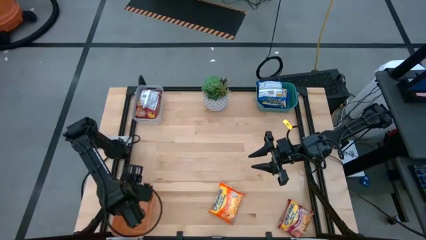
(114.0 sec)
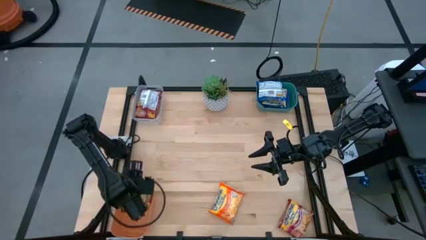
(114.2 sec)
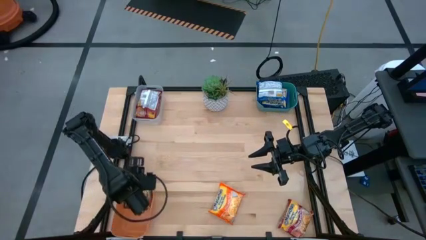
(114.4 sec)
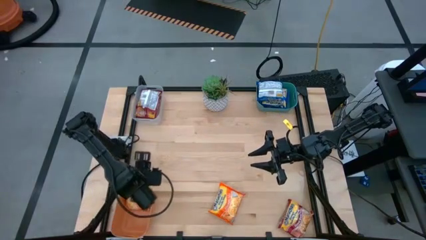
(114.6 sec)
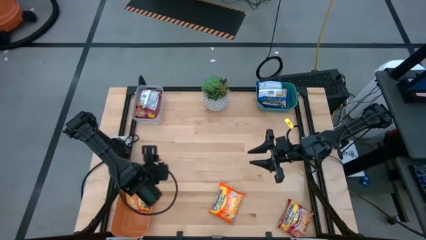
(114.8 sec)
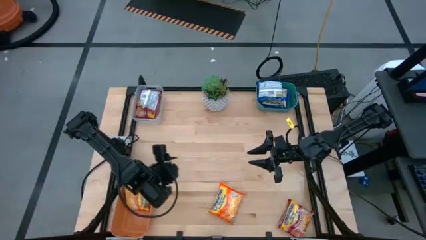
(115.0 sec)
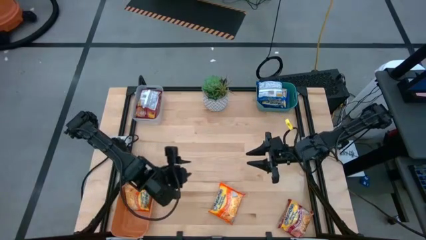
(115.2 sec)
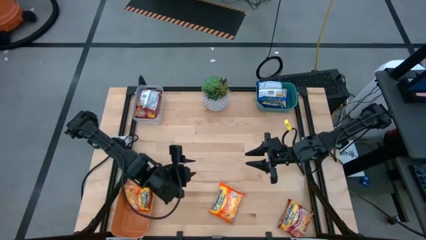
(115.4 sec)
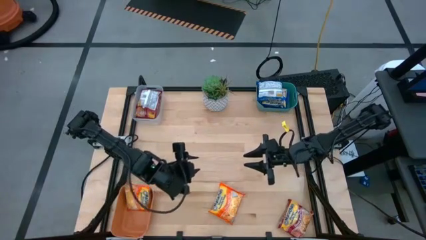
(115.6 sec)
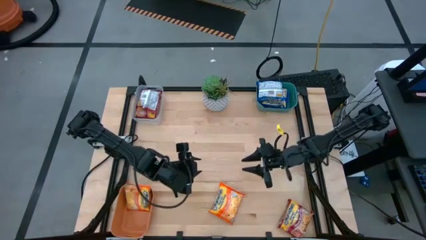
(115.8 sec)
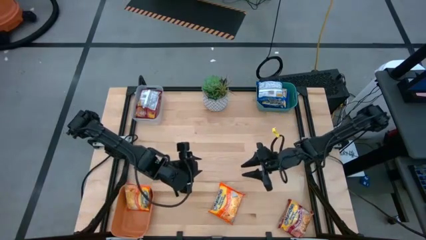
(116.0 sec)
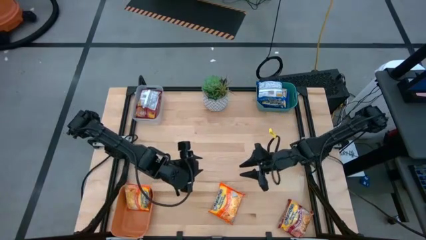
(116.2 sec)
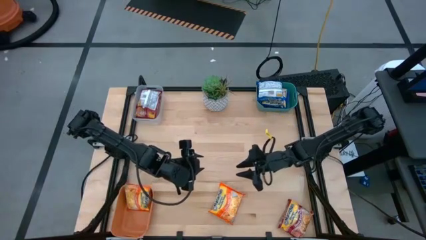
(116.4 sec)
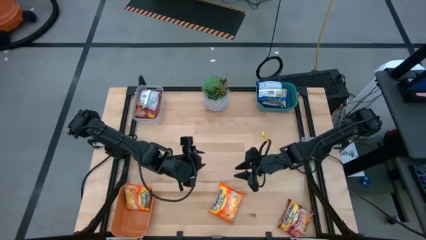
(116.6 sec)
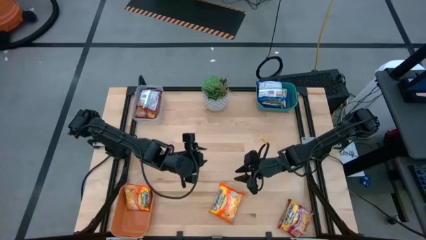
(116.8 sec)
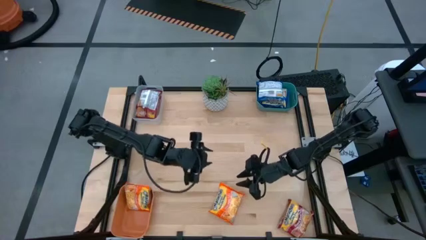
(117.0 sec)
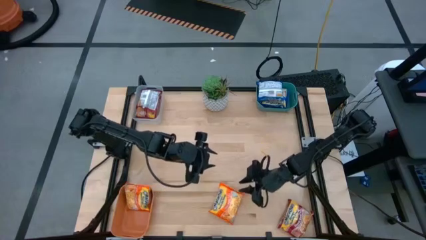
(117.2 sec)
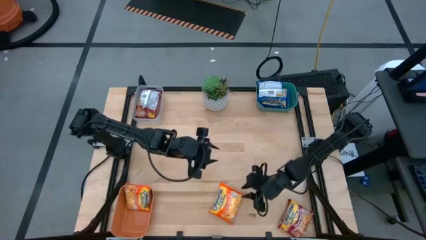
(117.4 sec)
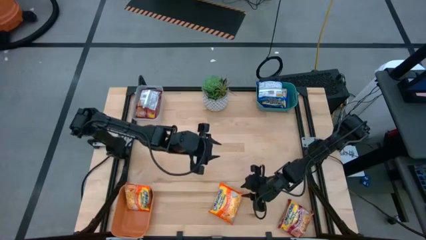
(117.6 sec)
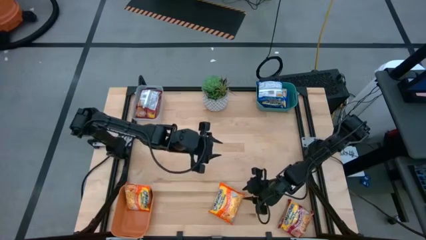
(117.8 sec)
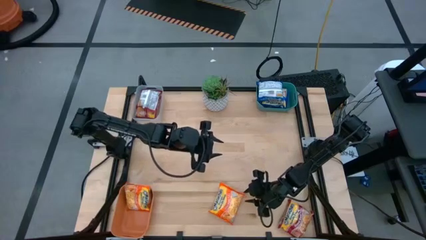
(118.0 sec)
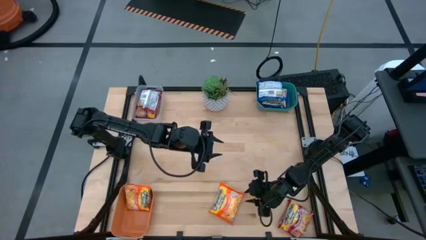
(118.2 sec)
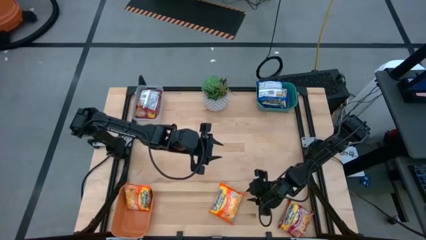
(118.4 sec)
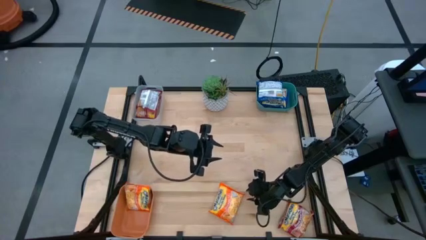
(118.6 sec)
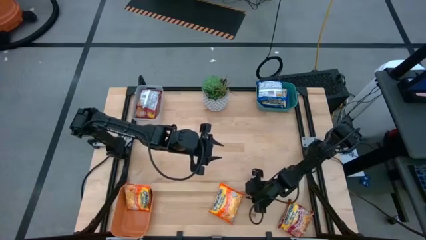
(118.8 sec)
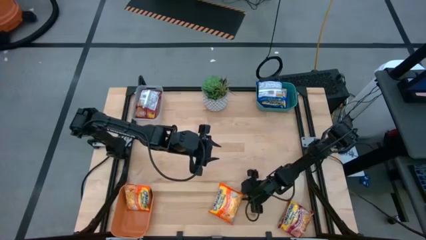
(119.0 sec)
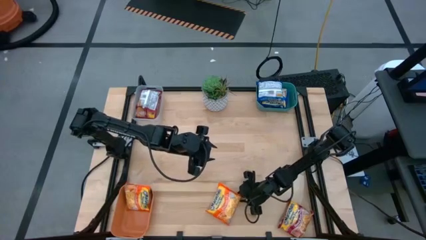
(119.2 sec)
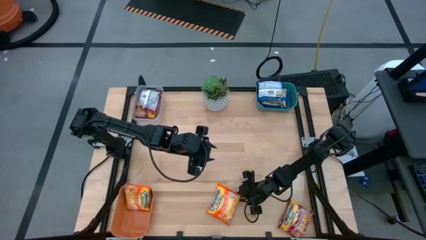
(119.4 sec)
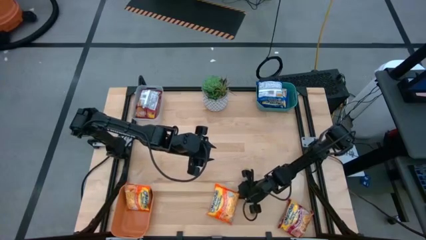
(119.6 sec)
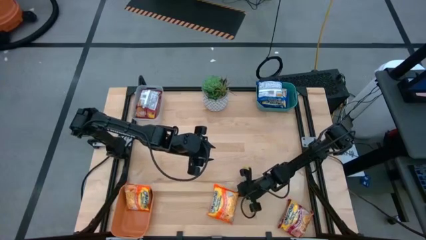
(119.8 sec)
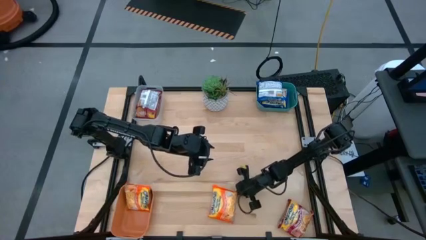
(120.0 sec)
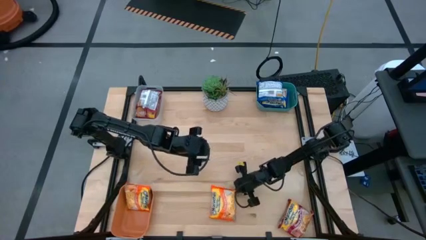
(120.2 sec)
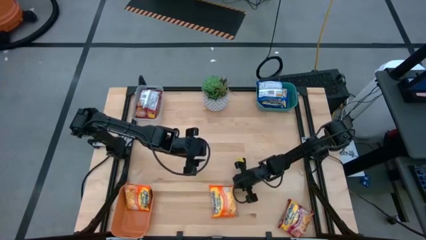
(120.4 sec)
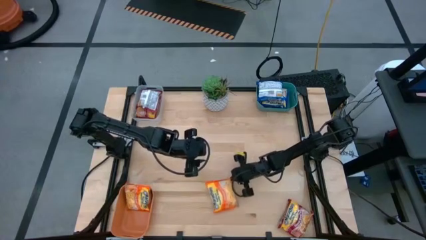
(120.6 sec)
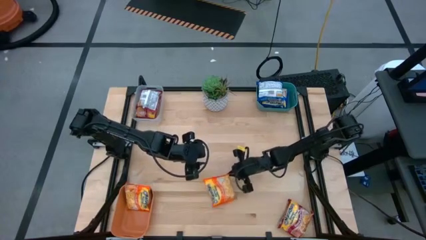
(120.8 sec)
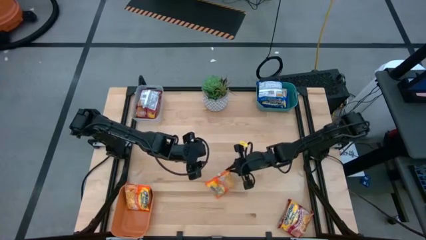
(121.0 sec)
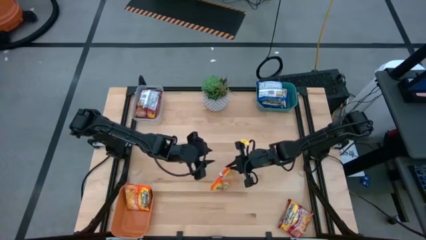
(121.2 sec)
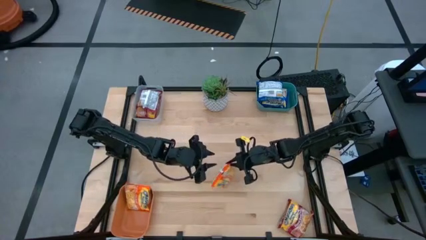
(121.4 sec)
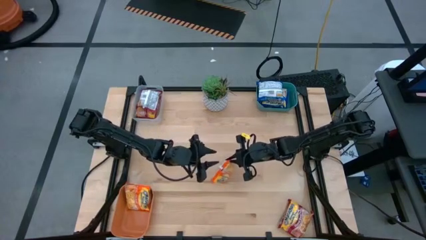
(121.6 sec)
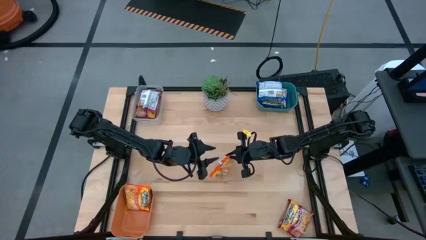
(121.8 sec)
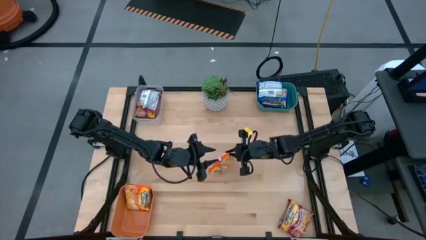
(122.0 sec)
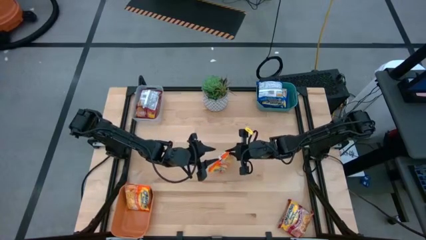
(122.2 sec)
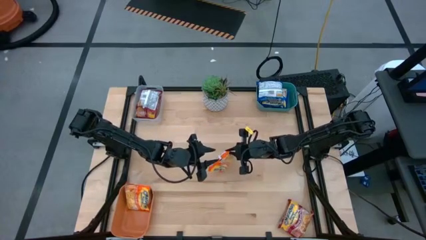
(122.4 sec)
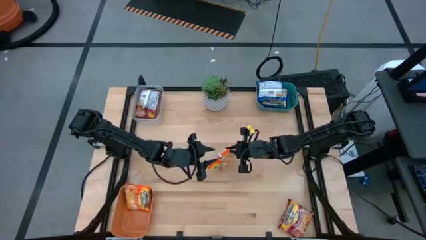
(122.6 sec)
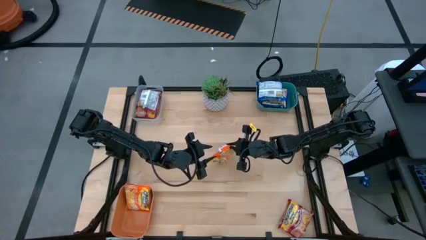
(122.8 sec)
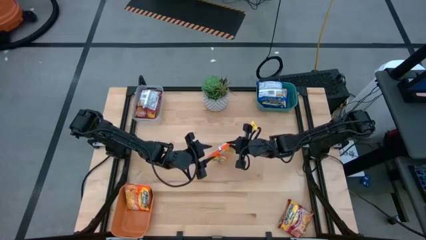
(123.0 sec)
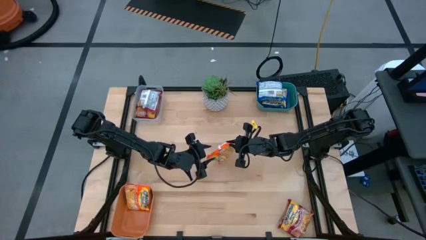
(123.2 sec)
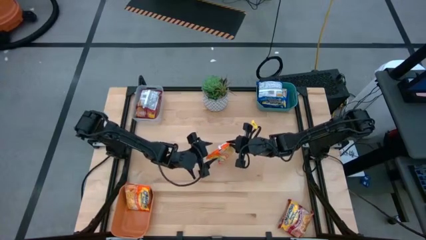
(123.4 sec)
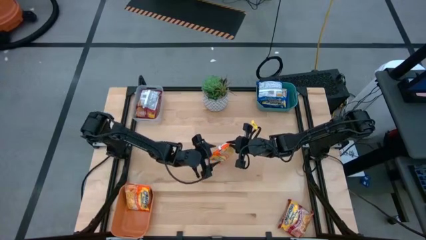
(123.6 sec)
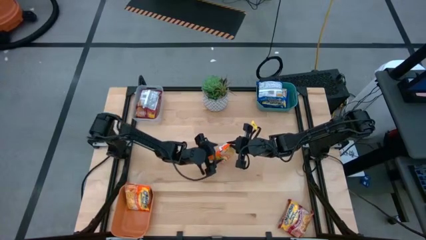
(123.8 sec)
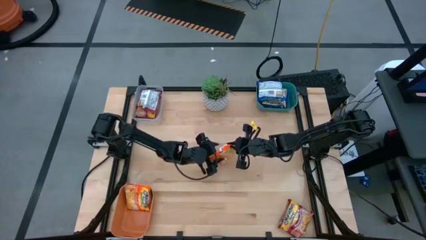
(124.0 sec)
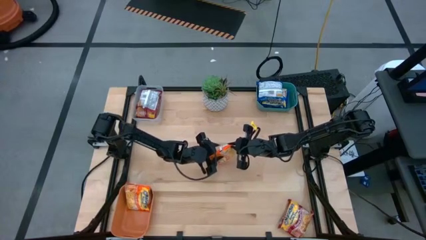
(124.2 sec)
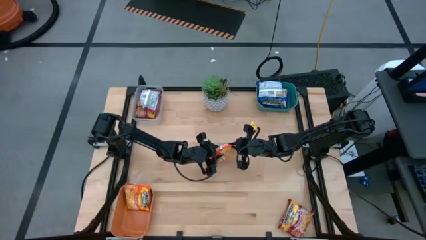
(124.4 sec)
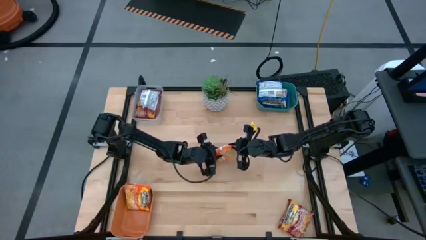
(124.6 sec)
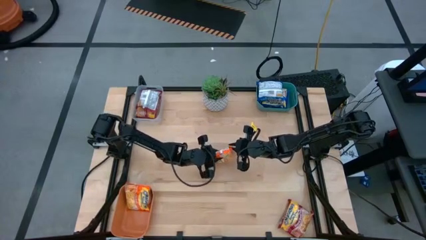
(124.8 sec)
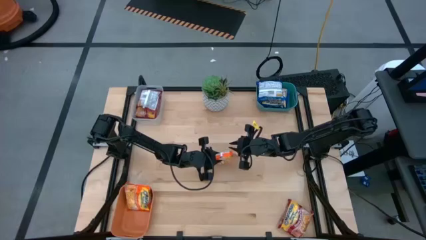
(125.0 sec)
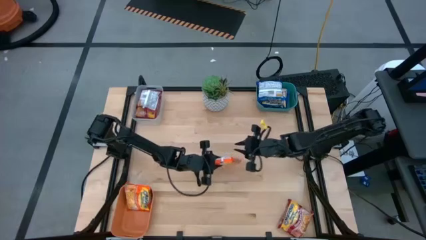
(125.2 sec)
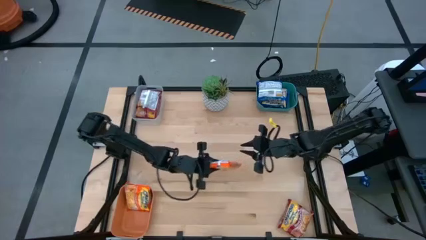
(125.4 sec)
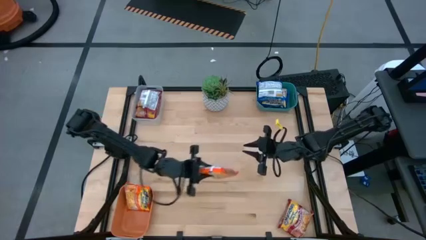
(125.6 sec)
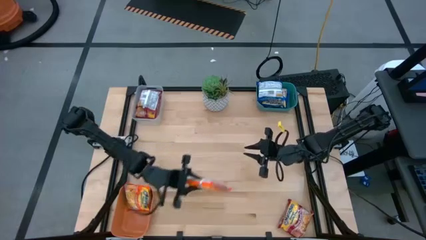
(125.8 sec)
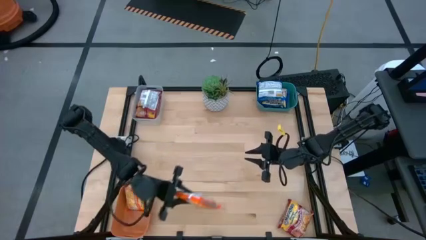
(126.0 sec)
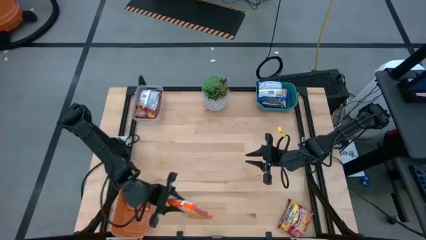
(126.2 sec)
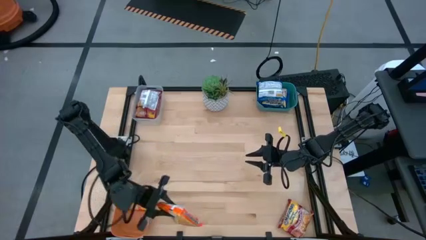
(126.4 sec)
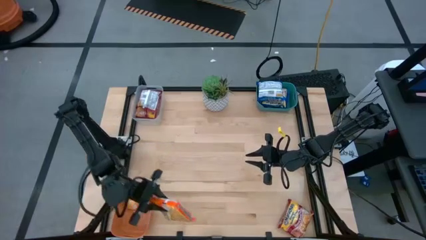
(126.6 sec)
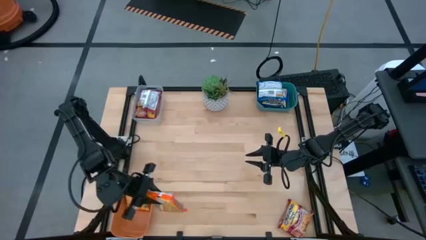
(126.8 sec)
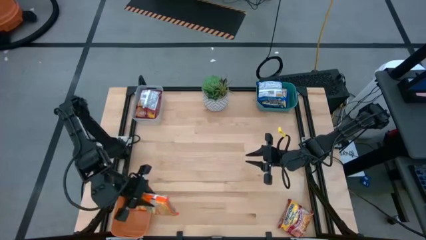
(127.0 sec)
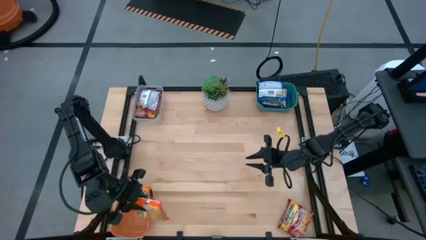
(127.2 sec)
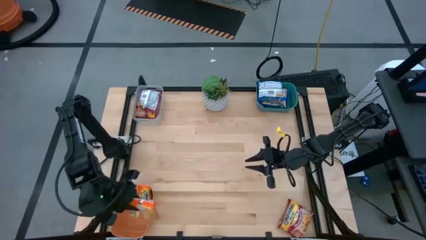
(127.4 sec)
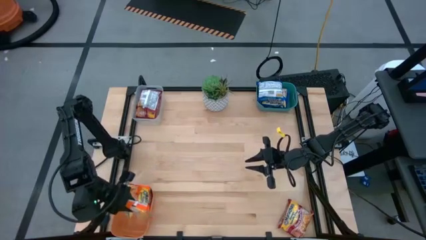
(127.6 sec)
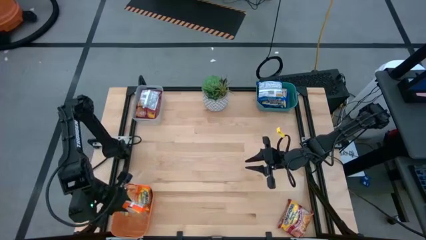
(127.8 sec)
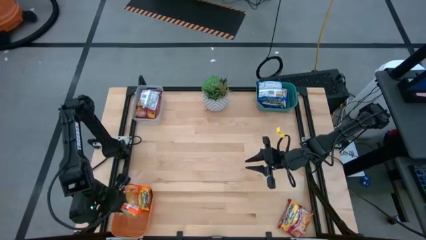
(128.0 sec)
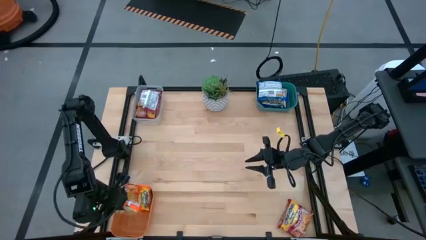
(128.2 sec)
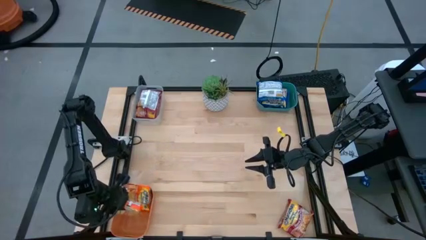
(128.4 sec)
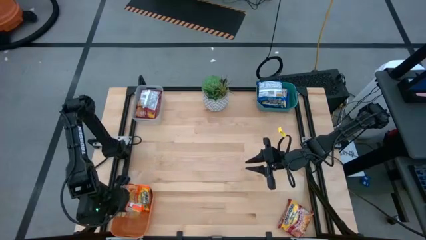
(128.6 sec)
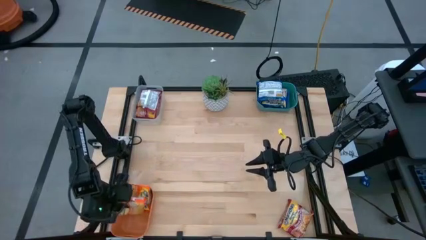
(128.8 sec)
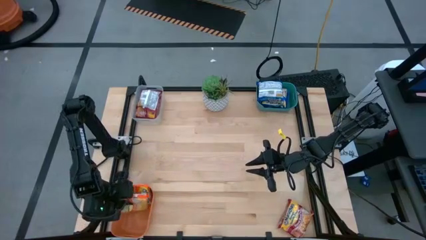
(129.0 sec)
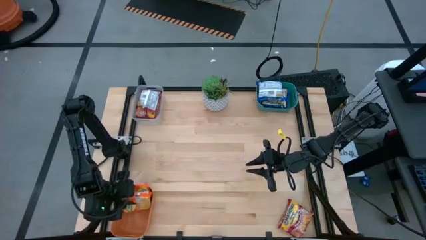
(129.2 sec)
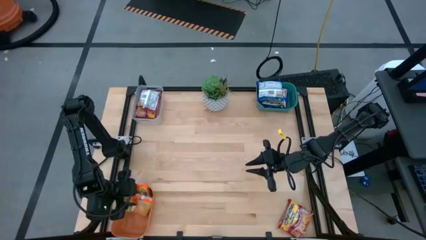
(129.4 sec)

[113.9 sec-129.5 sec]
Task: Sort Maruchan noodles
Put the orange noodle pack into the orange bin
